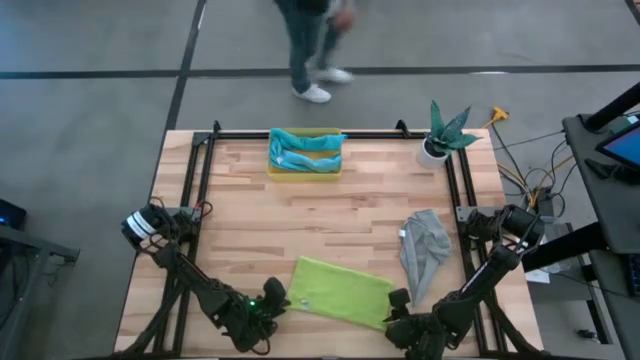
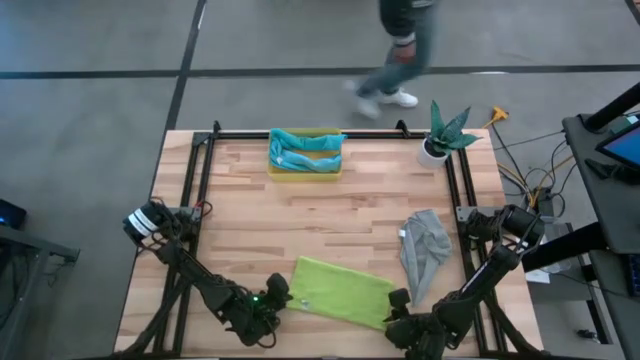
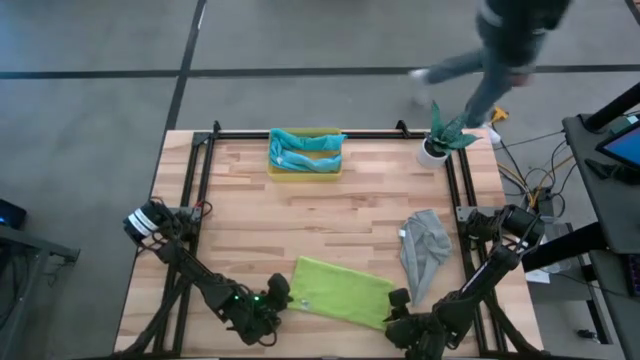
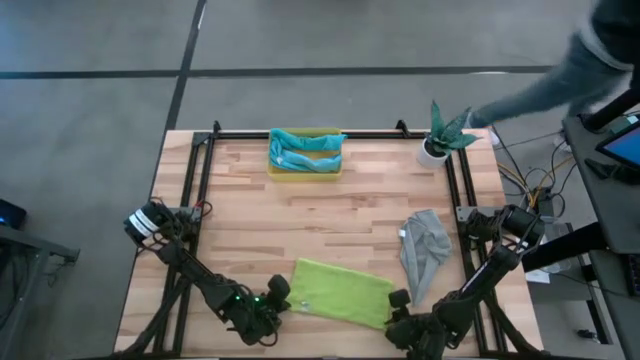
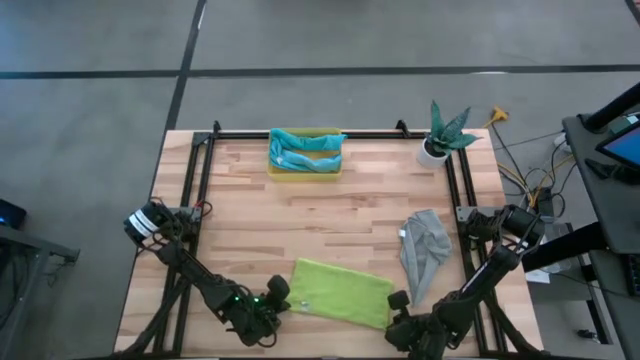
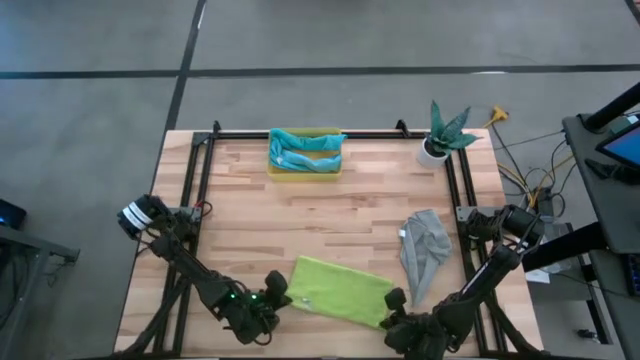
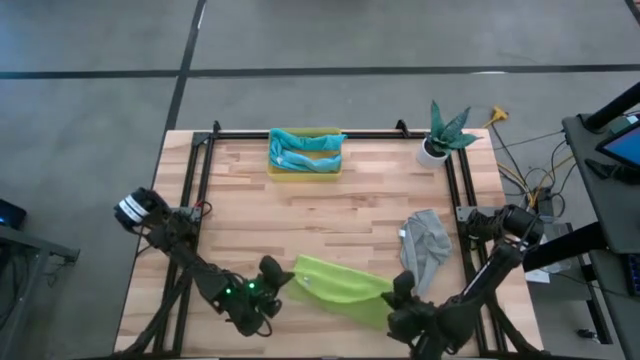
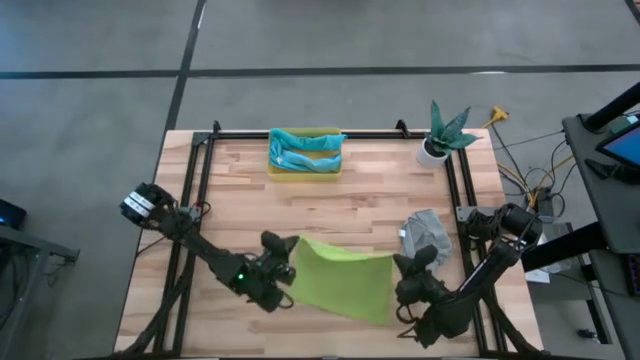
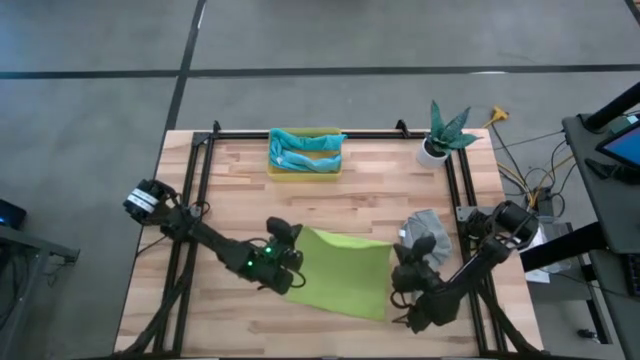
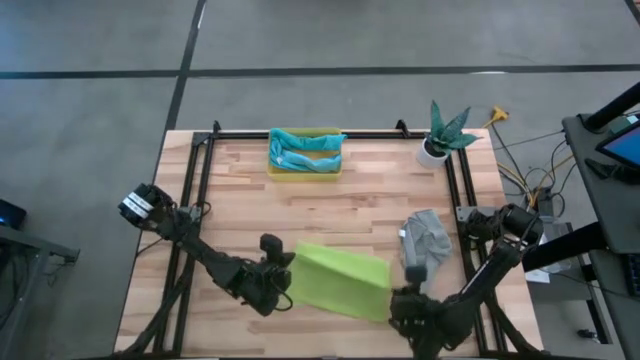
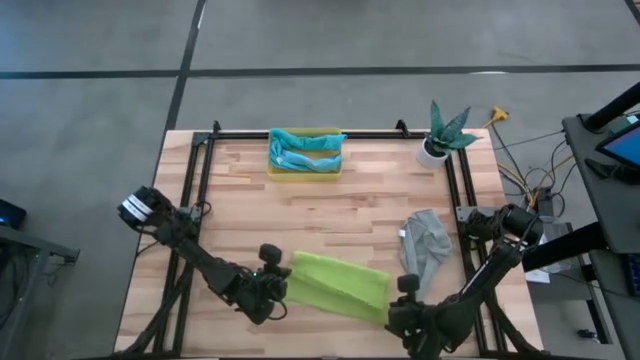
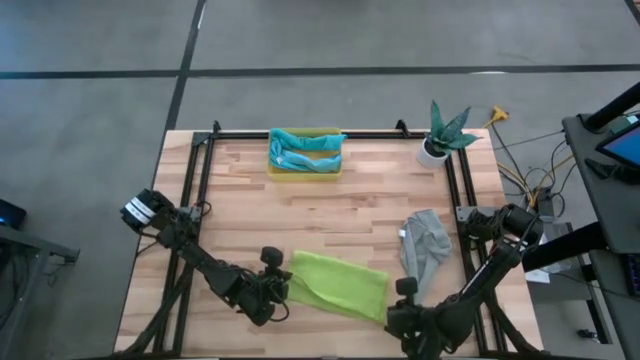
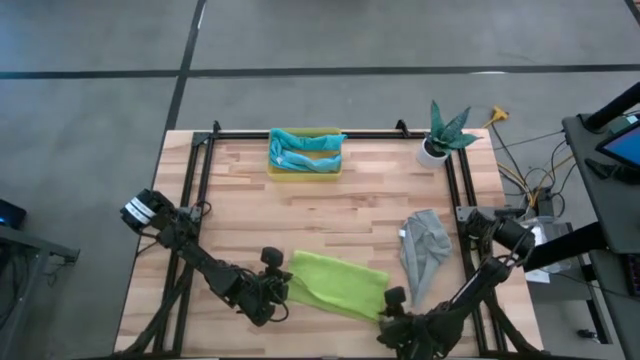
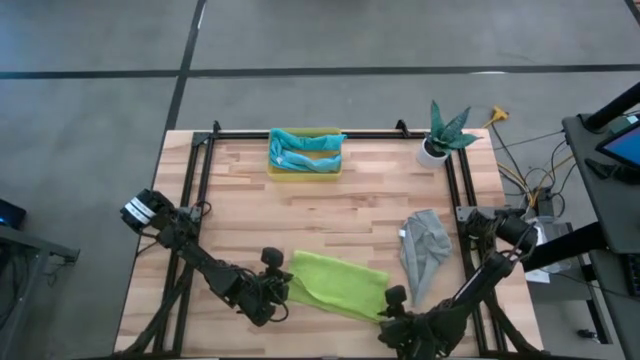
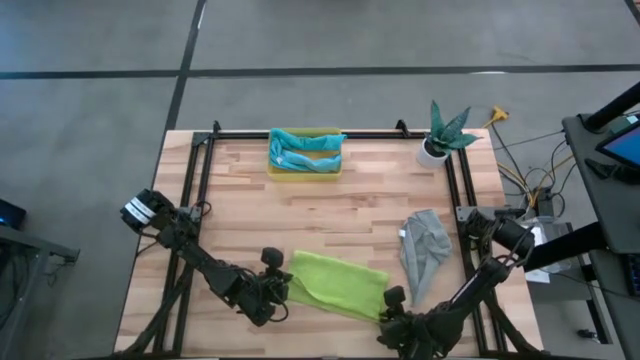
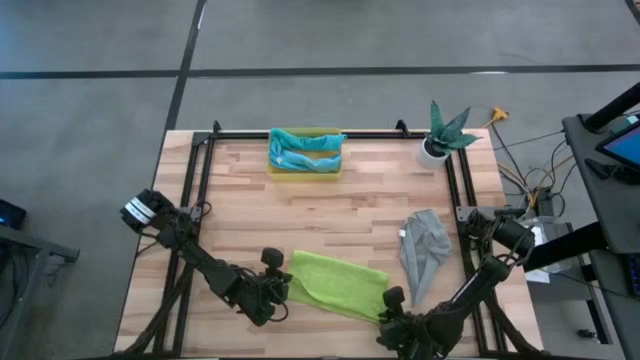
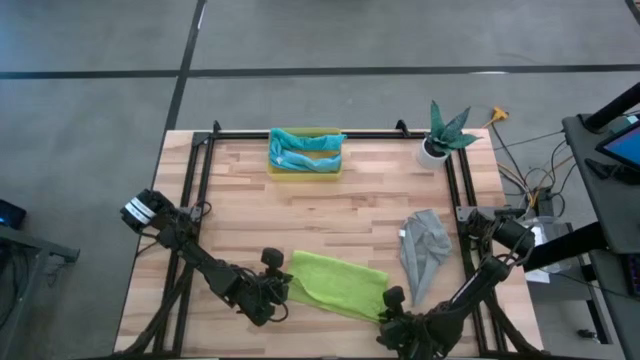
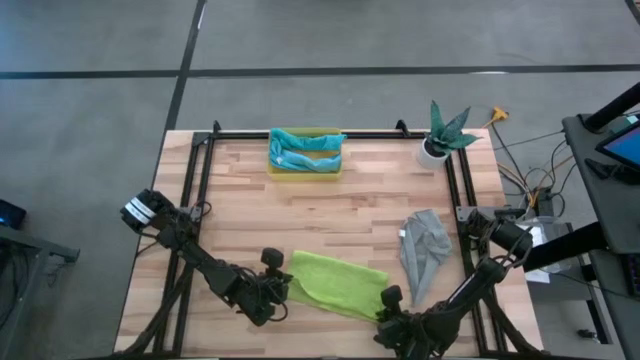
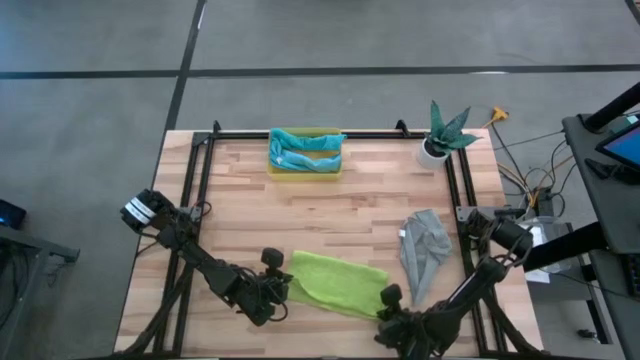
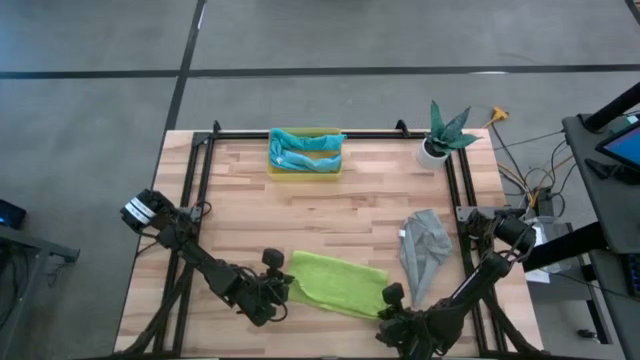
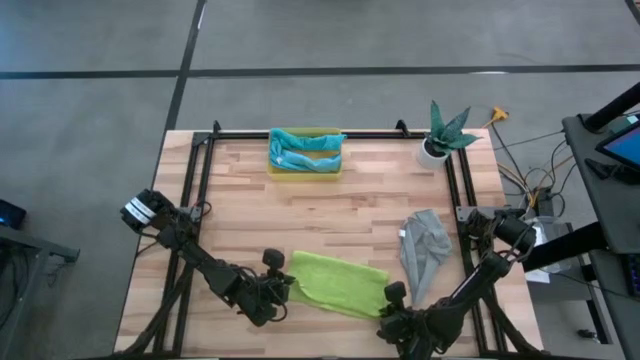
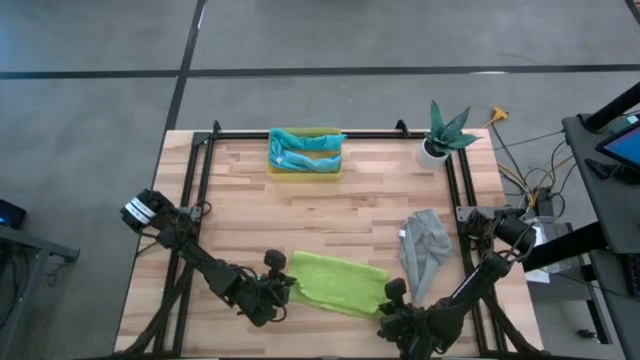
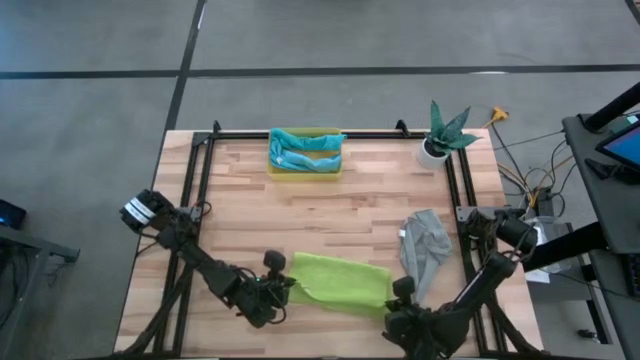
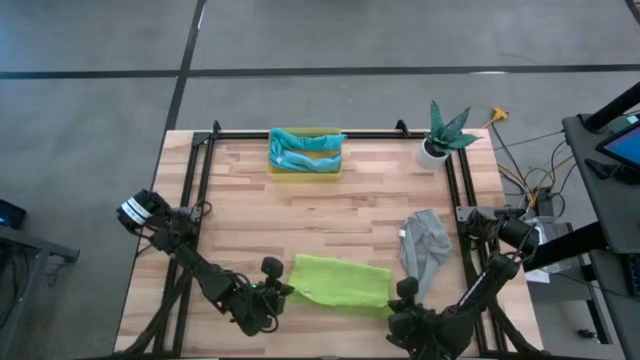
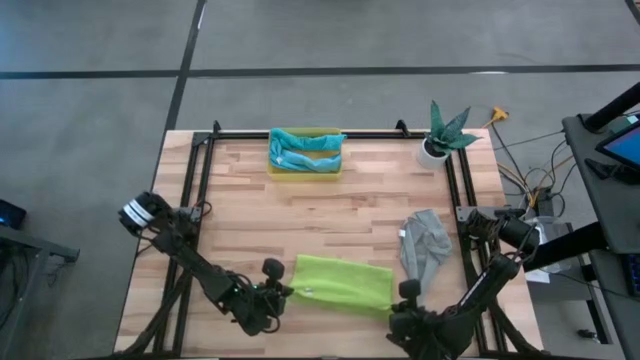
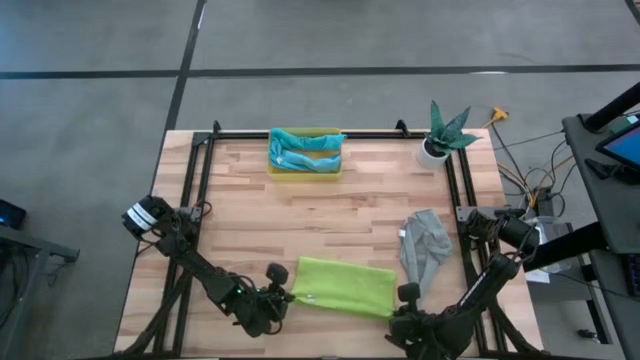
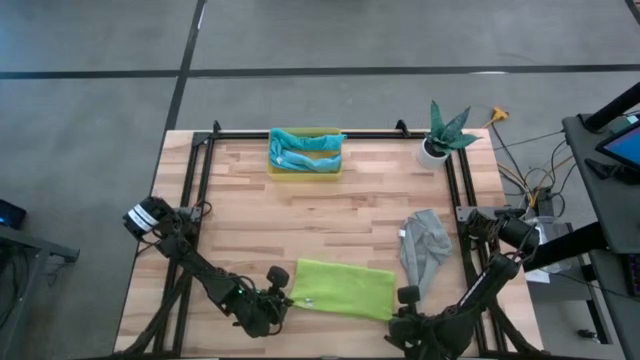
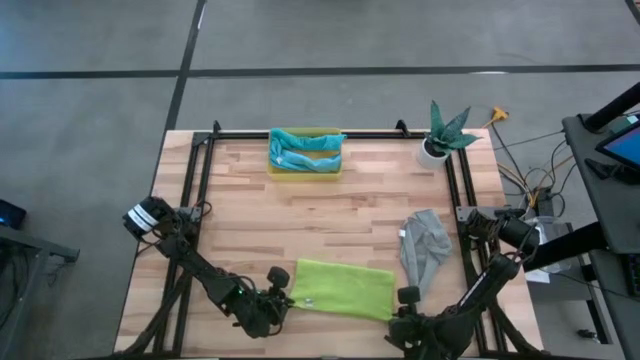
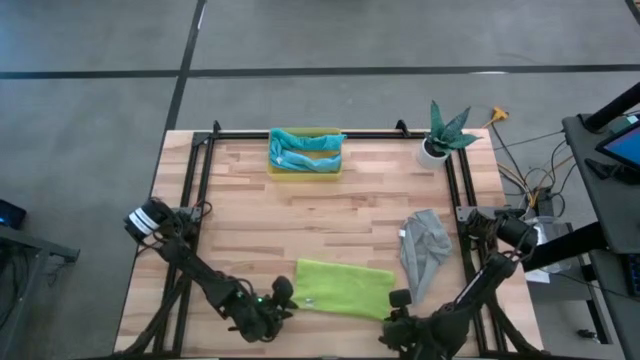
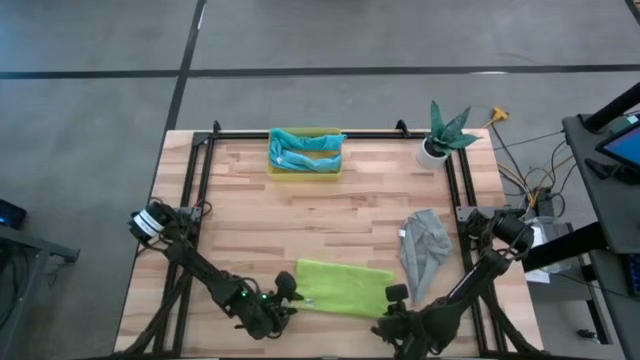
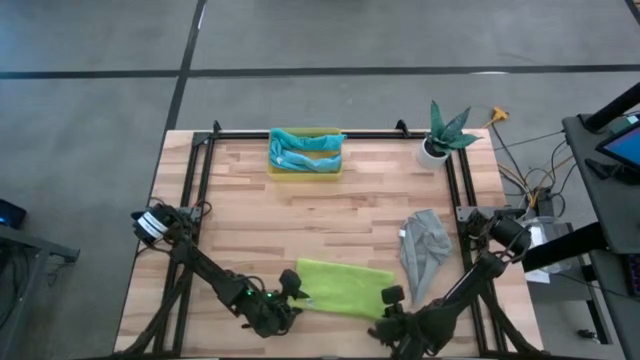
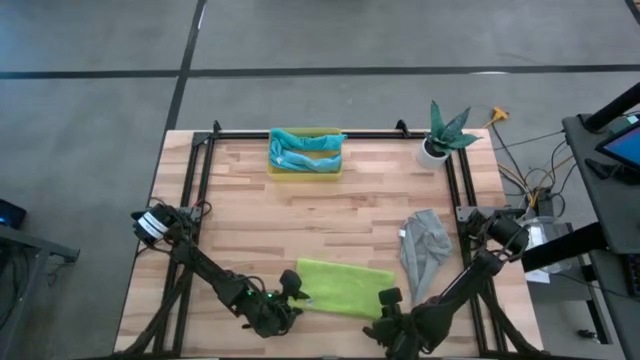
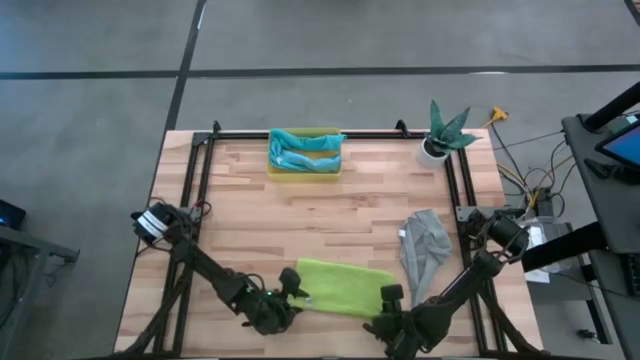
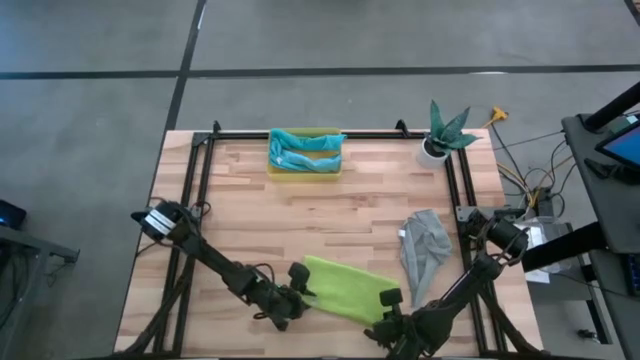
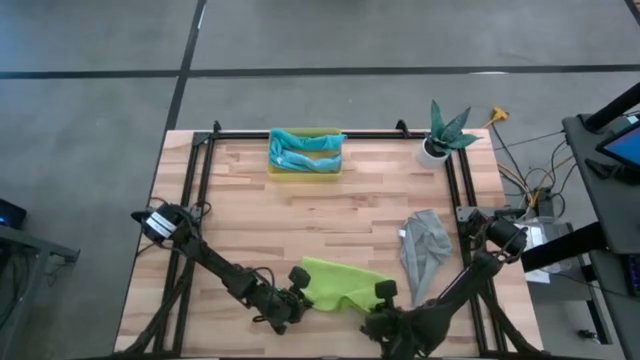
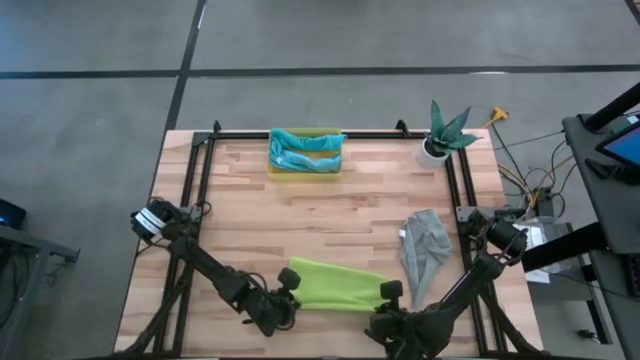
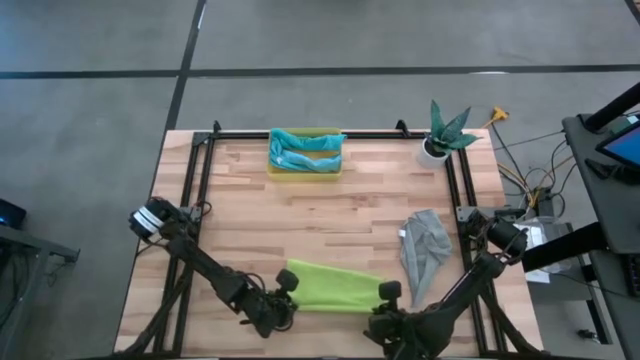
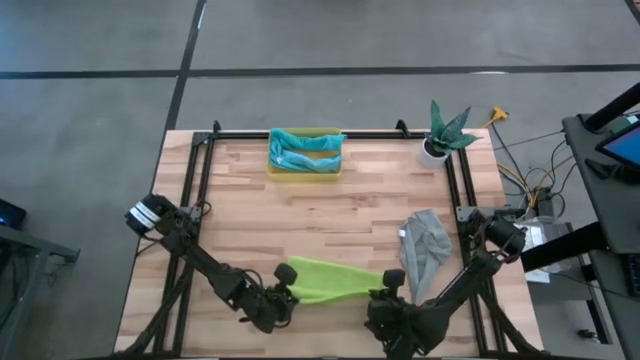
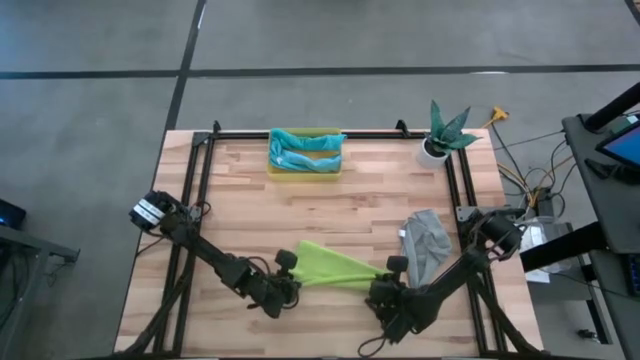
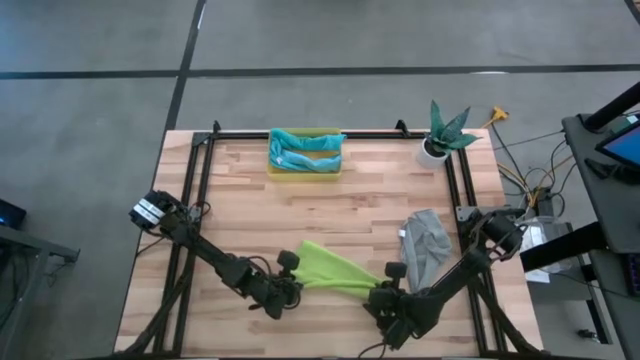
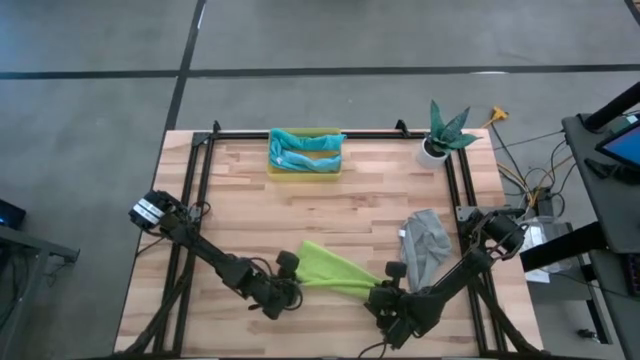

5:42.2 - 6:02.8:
Task: Roll microfiber towels into tight, uniform cylinder then place into a basket
Roll the green towel
